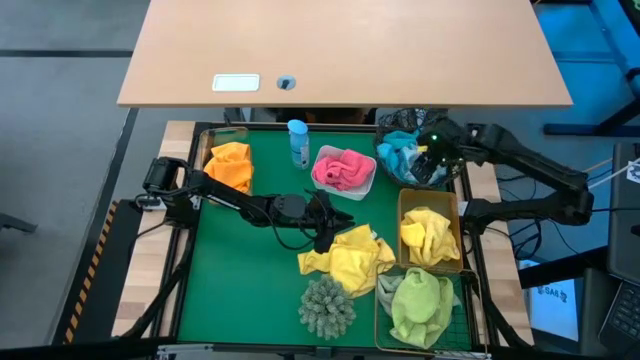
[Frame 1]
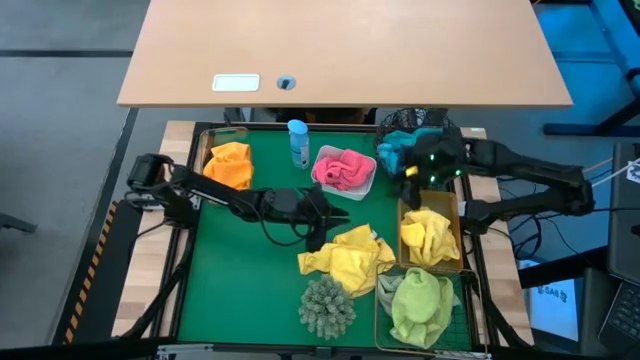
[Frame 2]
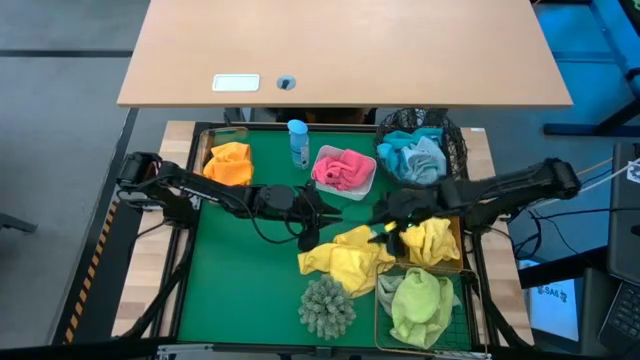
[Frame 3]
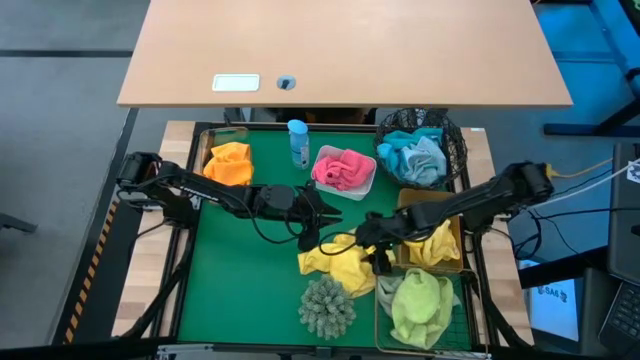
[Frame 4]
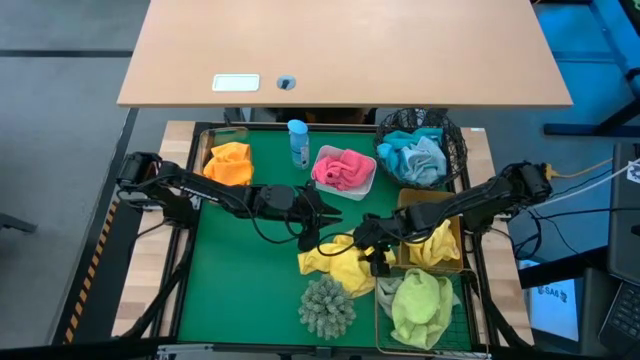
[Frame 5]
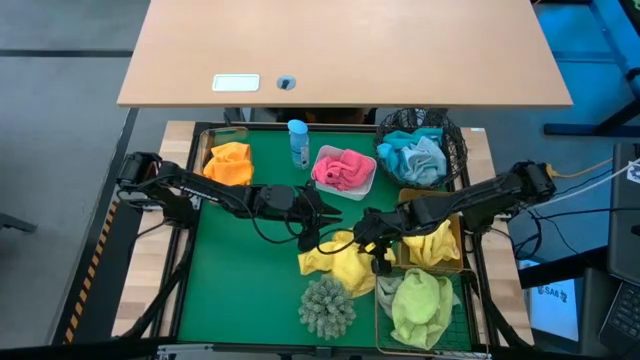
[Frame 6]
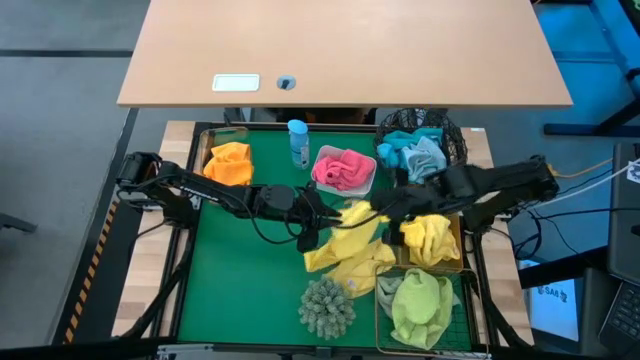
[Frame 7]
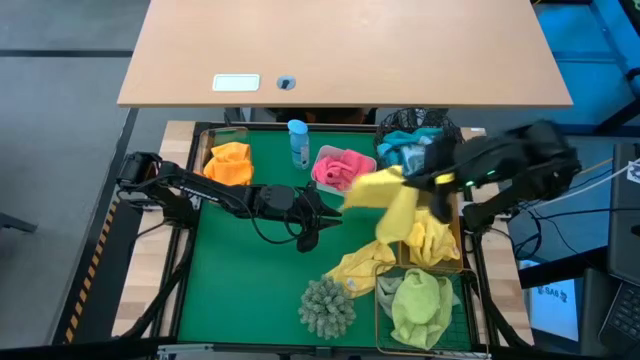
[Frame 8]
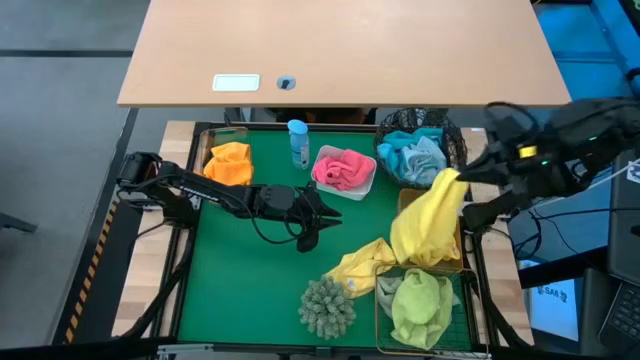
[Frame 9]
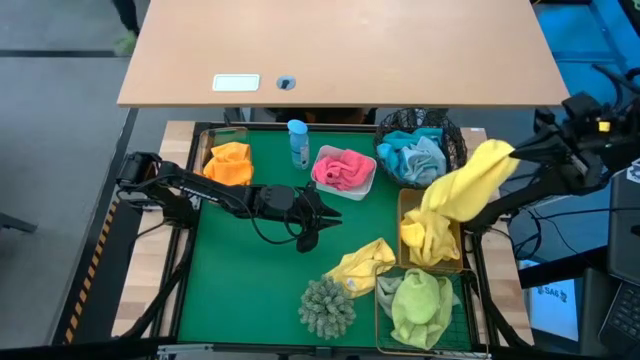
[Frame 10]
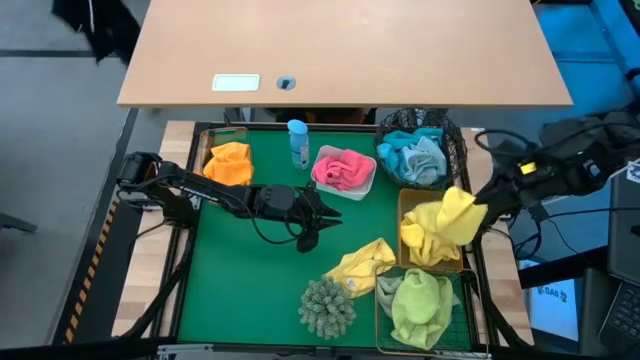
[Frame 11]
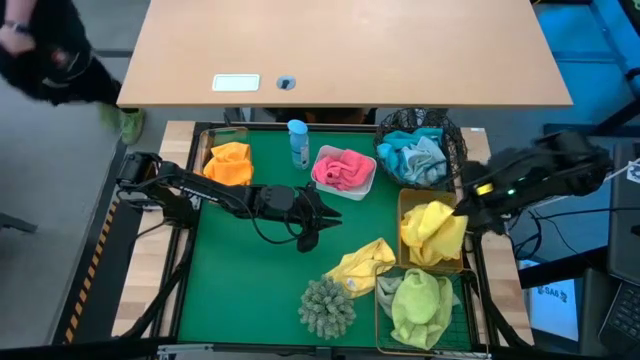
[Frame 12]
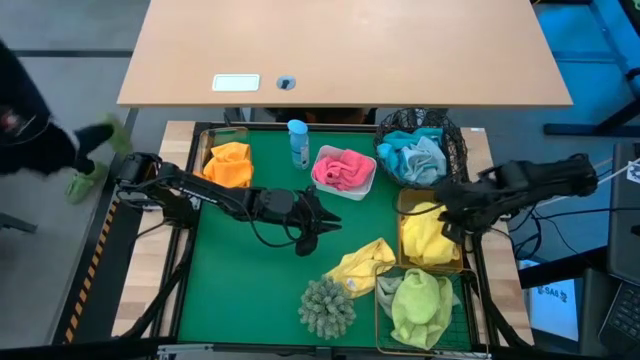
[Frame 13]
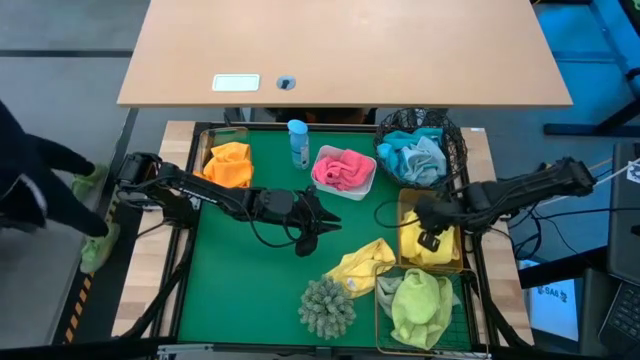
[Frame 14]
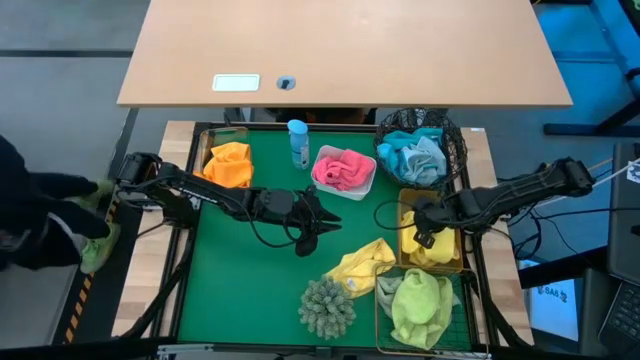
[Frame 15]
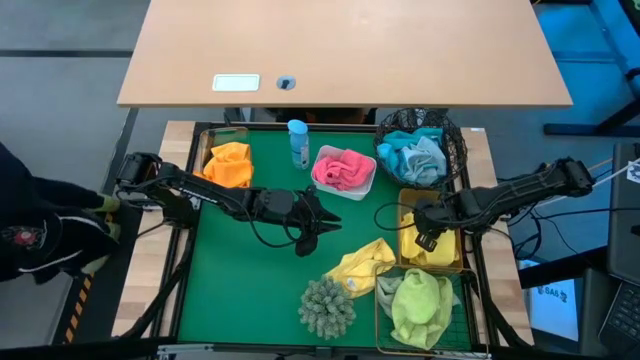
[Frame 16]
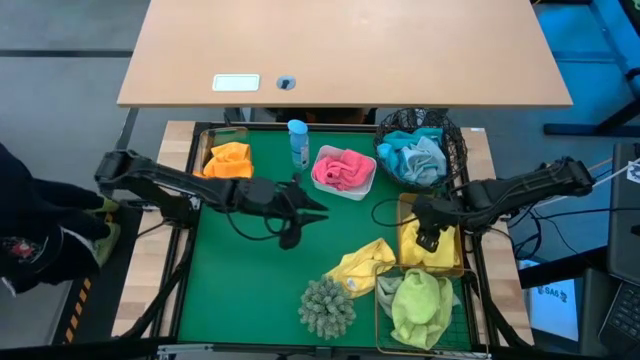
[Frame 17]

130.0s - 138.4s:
Task: Sort microfiber towel by color & place in baskets
Put the yellow microfiber towel into the yellow bin

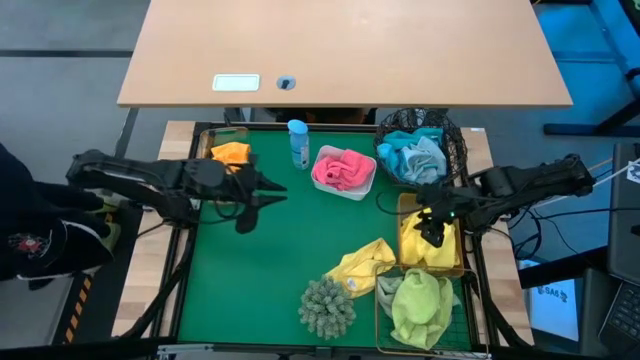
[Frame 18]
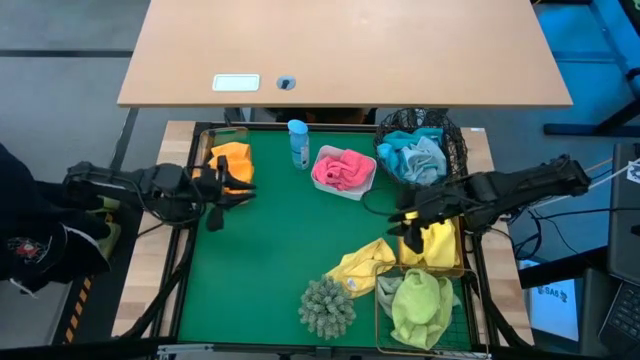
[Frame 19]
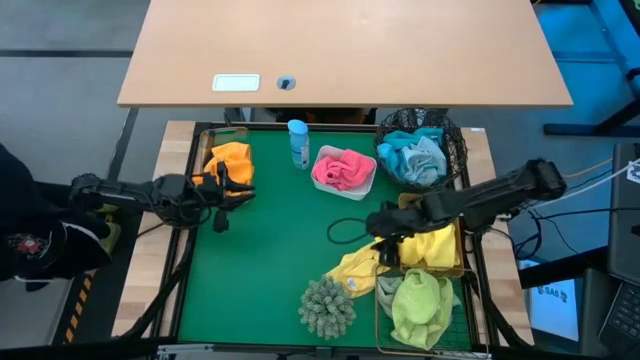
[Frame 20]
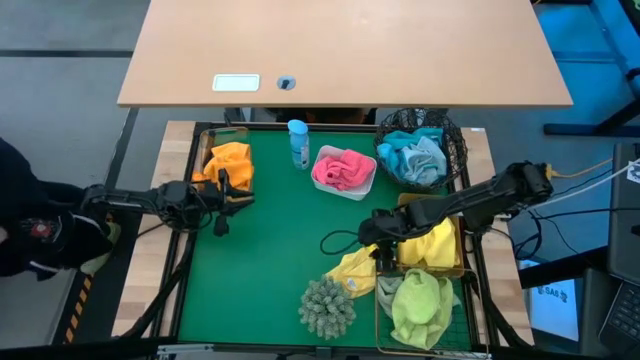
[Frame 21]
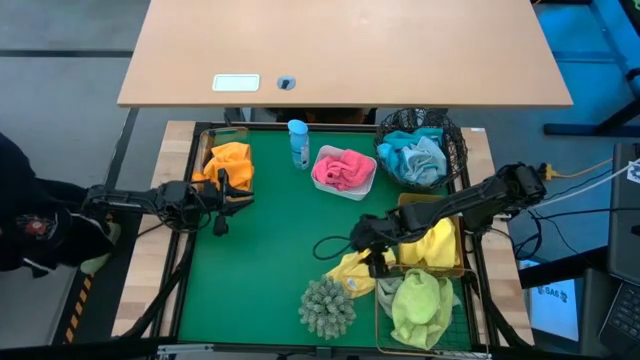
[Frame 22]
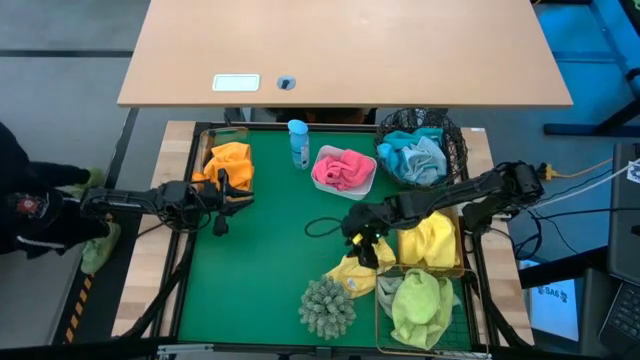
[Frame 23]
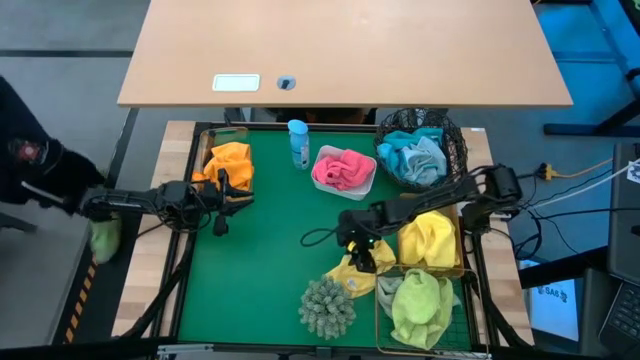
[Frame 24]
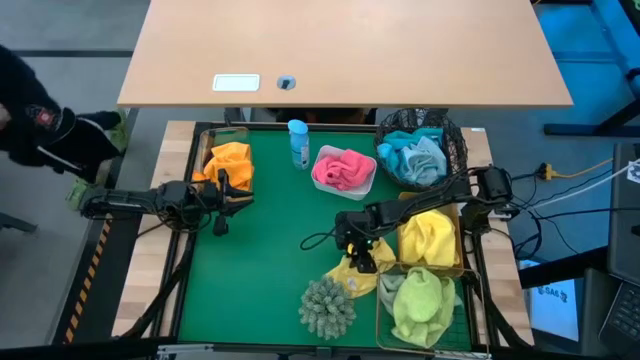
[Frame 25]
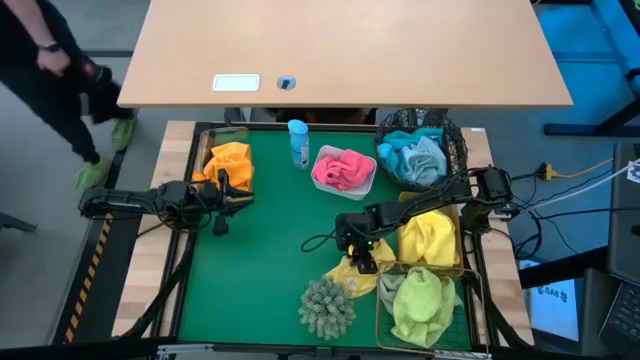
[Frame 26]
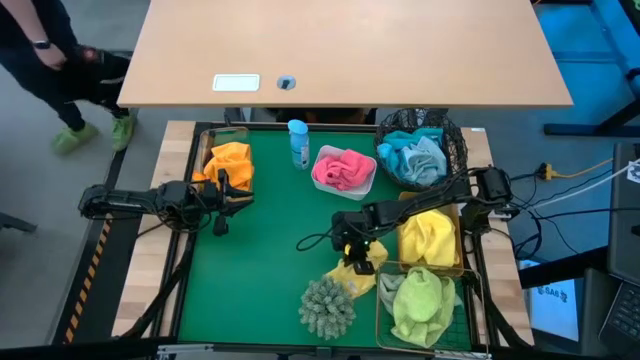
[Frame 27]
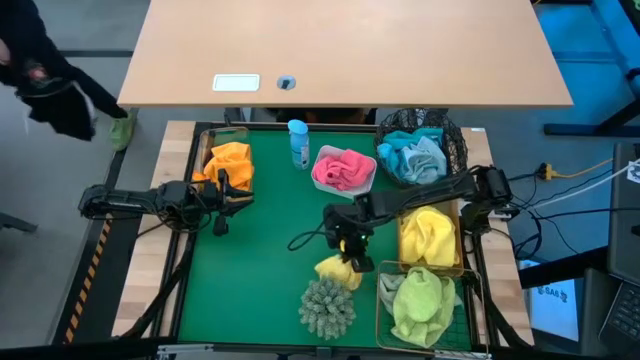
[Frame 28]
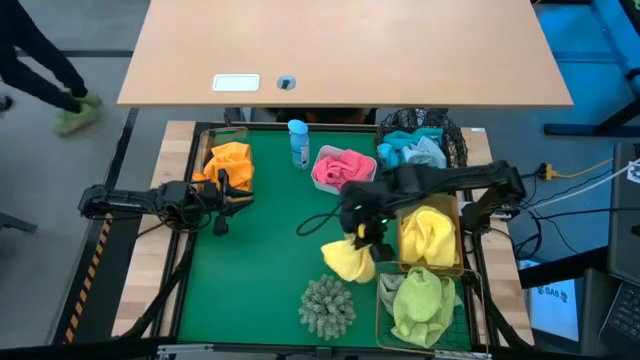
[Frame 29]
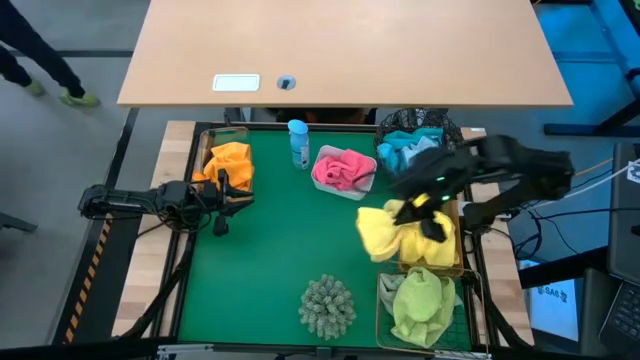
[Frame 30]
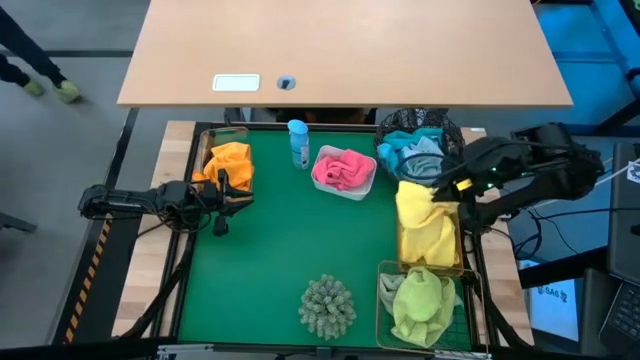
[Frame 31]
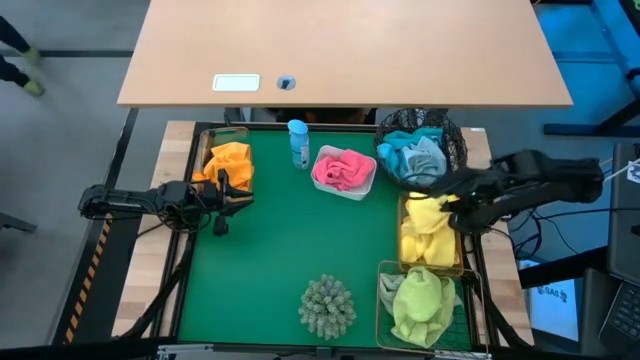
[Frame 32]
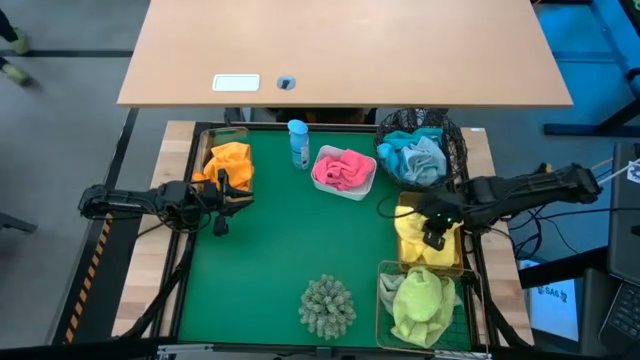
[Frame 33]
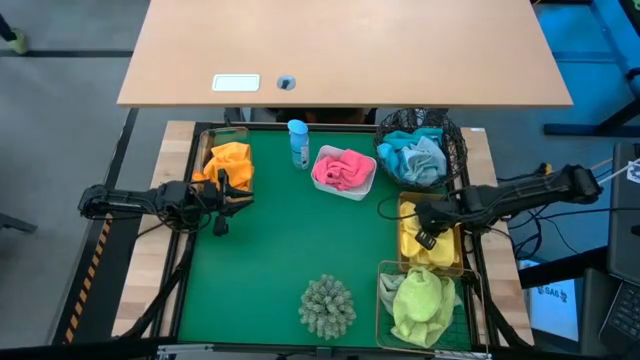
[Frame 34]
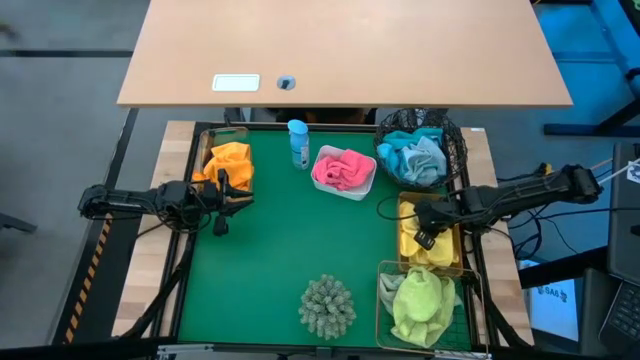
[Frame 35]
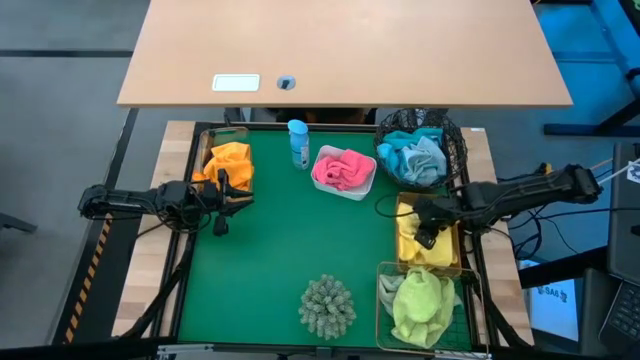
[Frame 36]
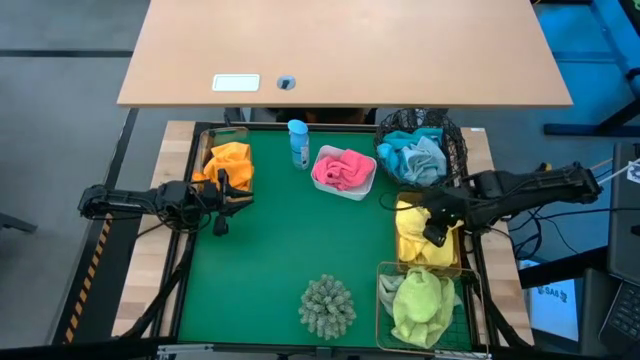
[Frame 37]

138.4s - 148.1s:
Put the yellow microfiber towel into the yellow bin

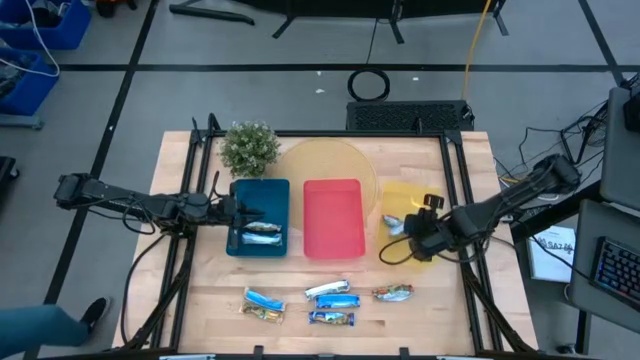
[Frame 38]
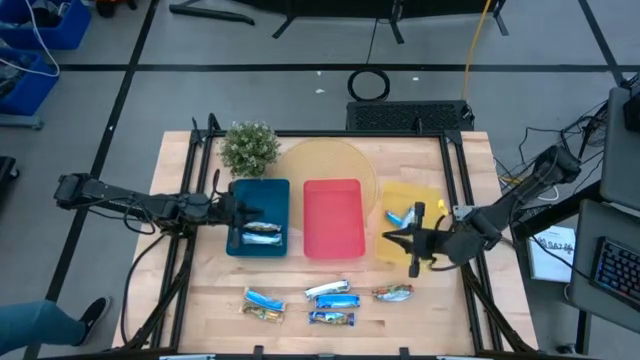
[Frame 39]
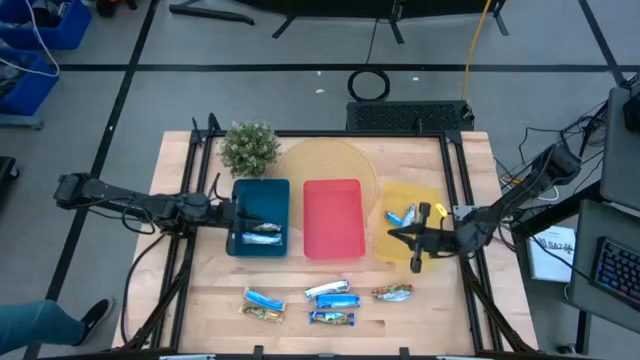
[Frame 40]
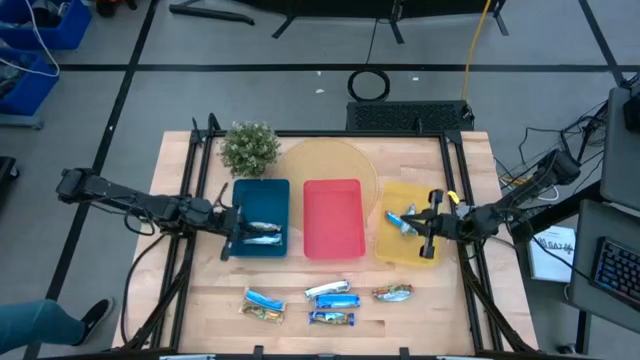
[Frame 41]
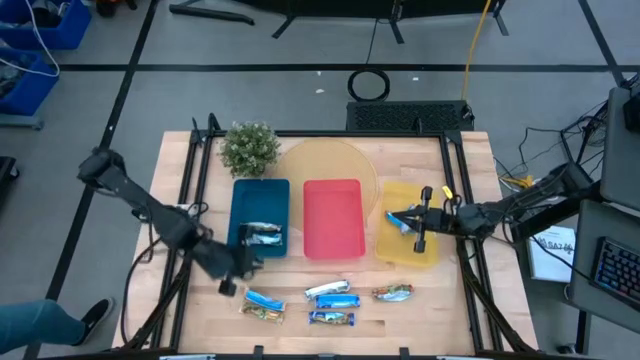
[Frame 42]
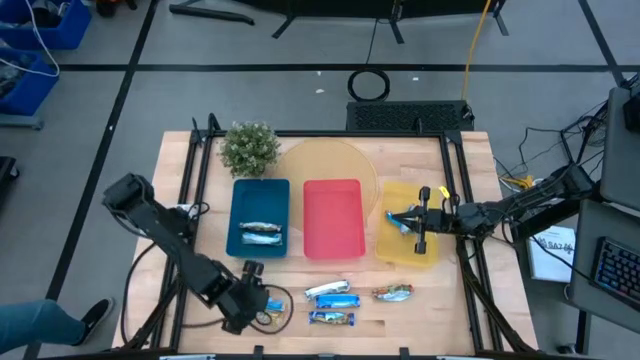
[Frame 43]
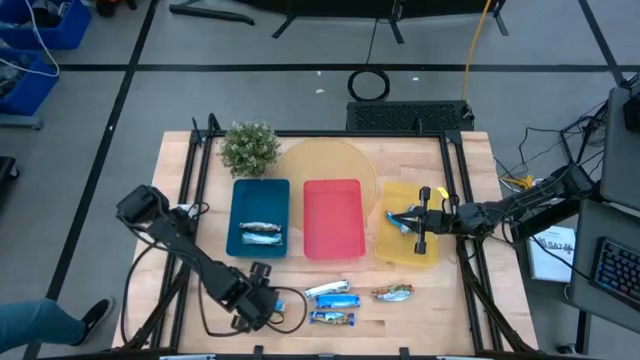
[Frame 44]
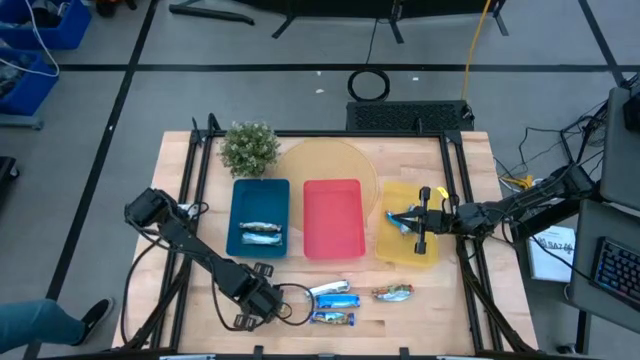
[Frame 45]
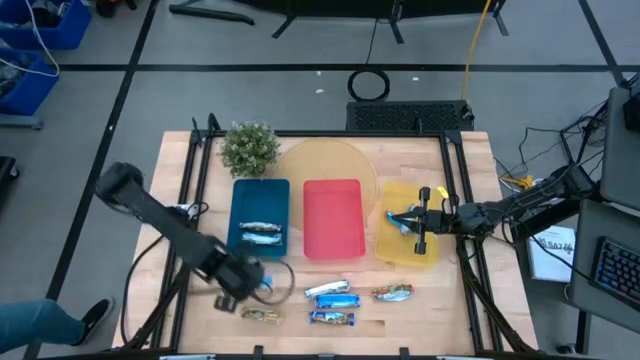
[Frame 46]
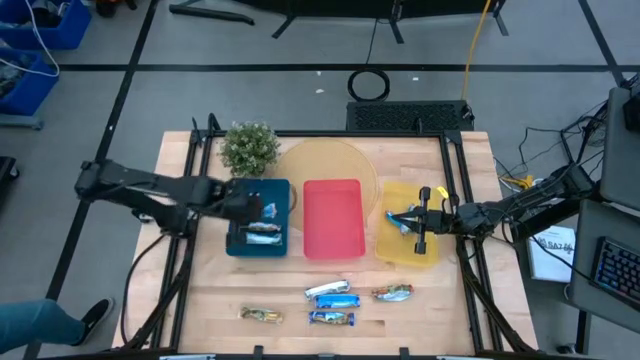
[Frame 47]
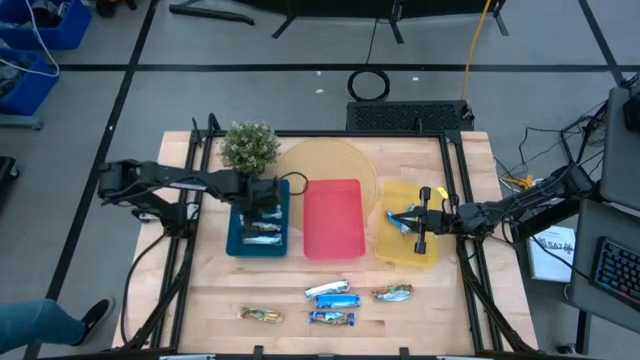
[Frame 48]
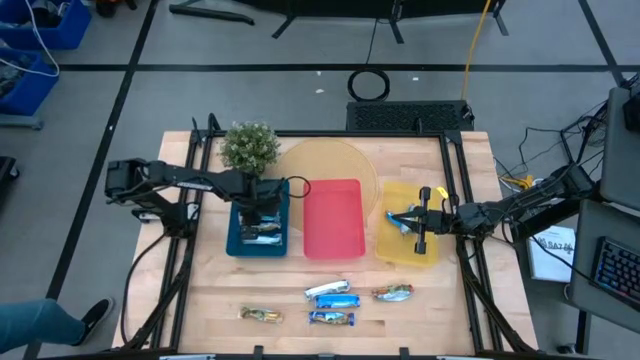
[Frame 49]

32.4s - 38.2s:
Task: Pick and place Granola Bars by type
Put the yellow granola bar into the blue bin
